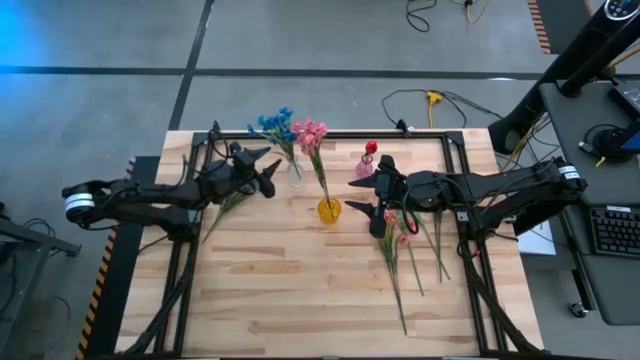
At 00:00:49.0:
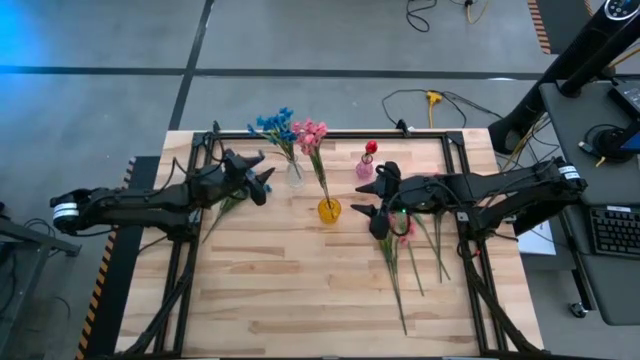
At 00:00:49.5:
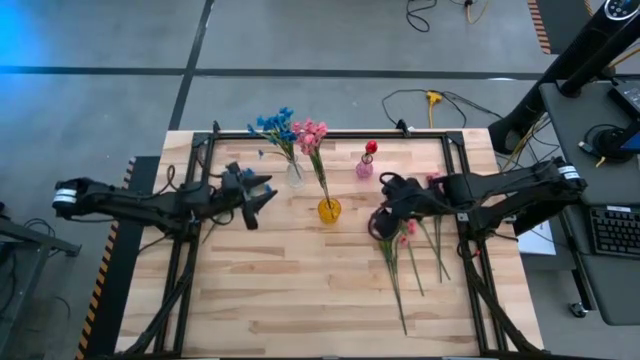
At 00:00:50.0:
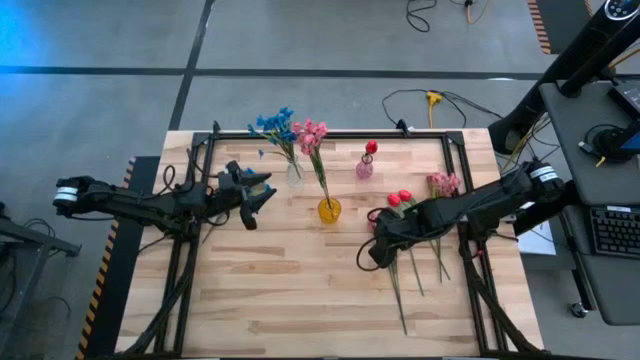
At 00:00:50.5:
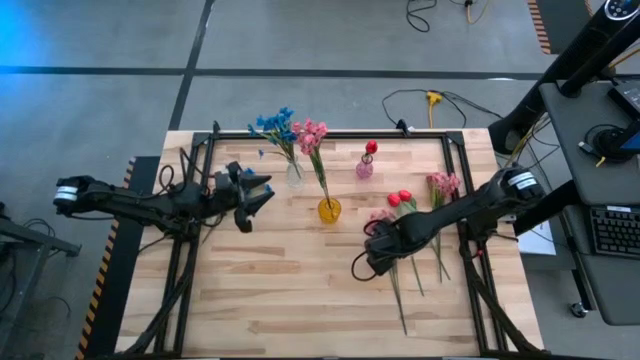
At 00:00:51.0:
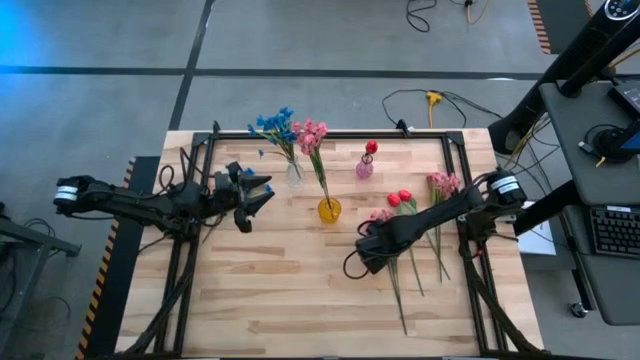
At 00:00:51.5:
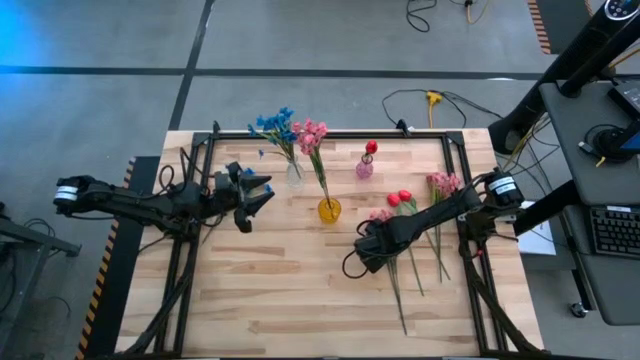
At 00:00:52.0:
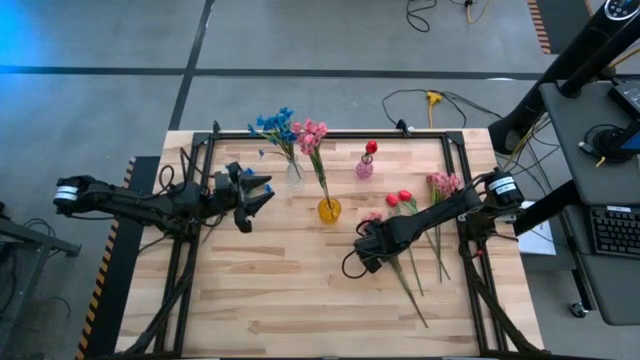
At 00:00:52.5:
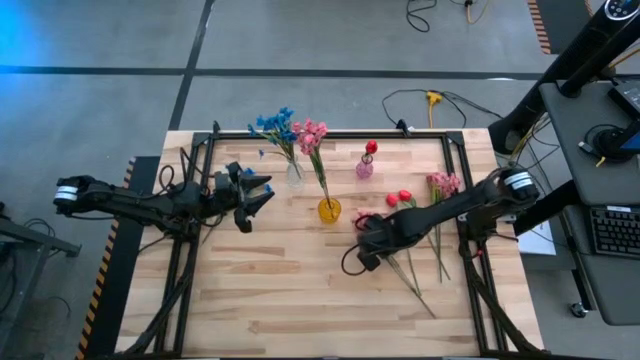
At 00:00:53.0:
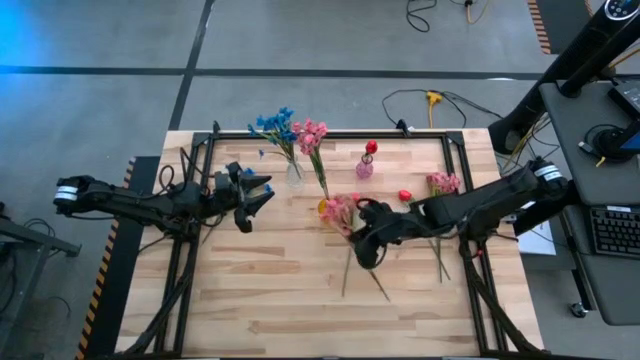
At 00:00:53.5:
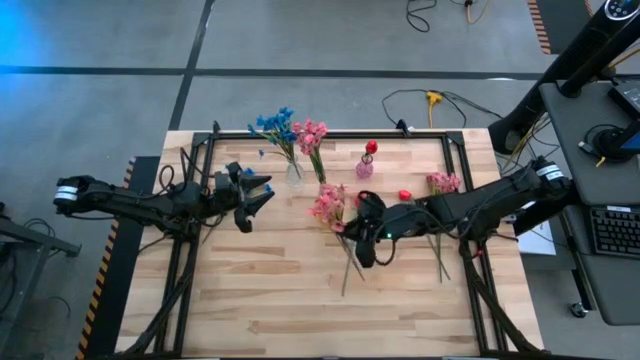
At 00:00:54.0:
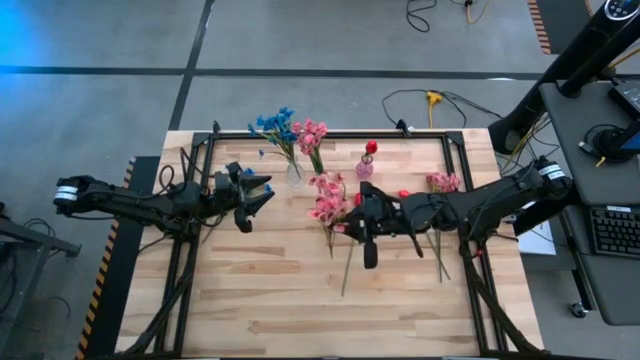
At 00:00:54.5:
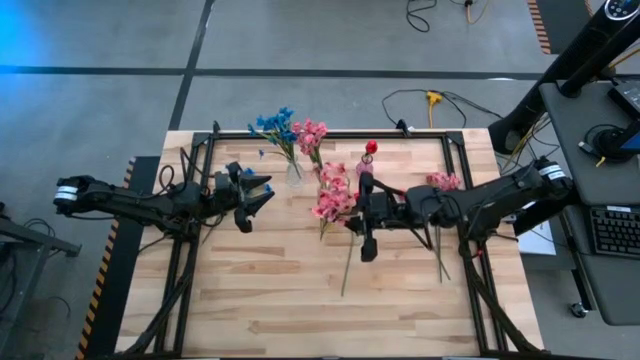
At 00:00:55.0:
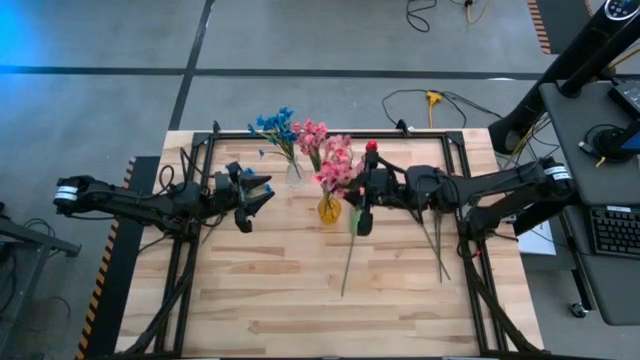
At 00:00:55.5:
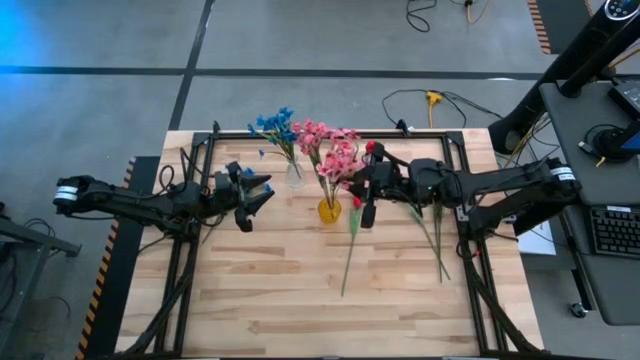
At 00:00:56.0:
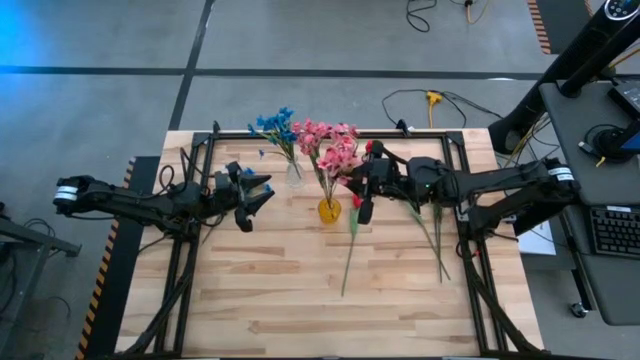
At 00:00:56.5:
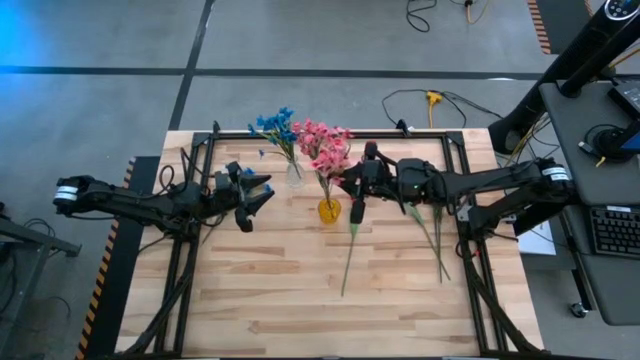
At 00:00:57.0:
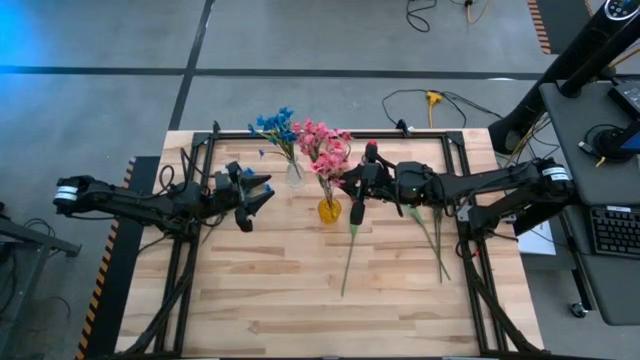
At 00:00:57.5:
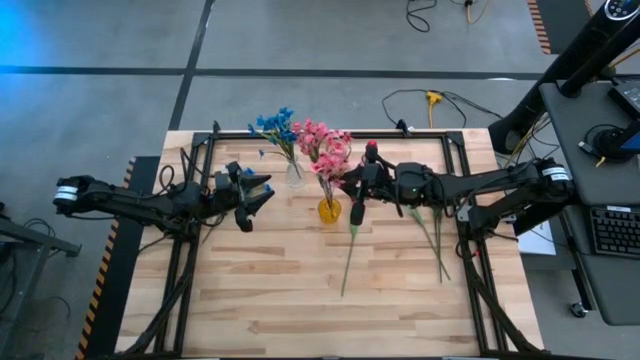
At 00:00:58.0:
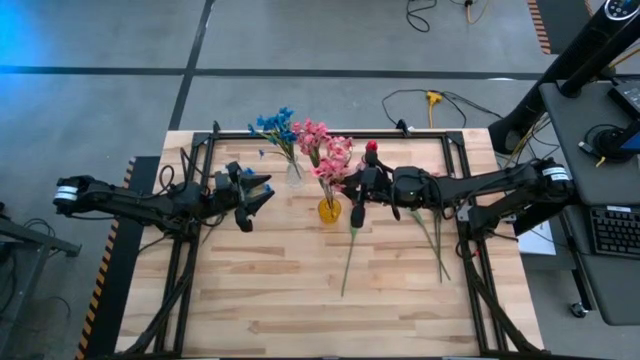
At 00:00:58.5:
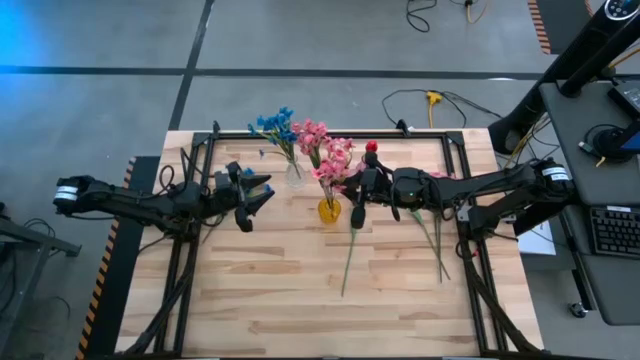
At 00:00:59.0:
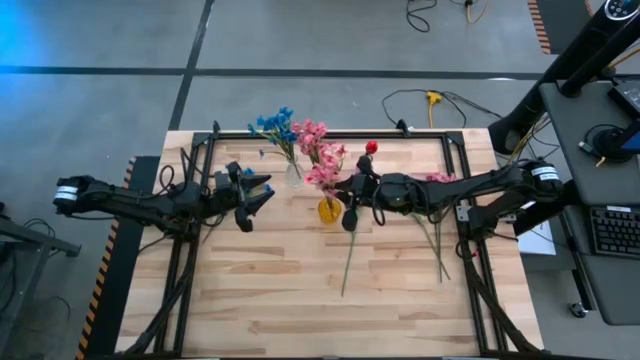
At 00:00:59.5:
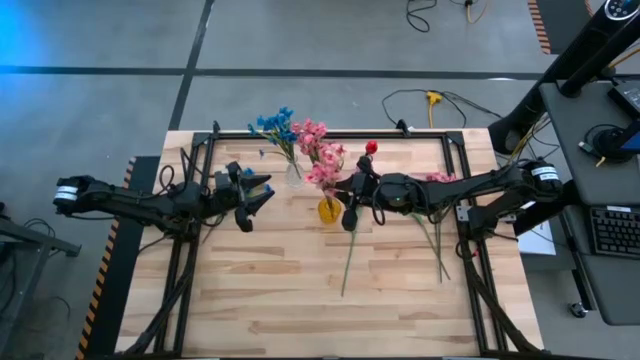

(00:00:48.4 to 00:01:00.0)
Task: Sort flowers into vase by color
Put the left pink flowers into the yellow vase

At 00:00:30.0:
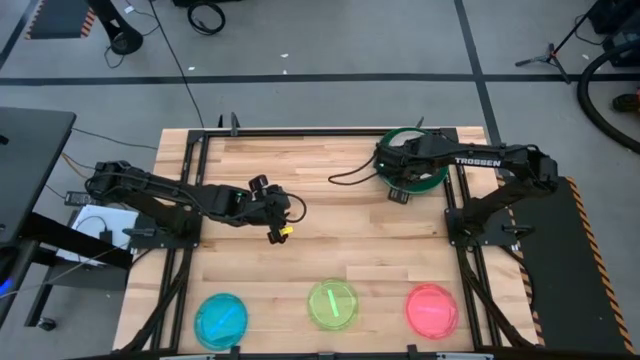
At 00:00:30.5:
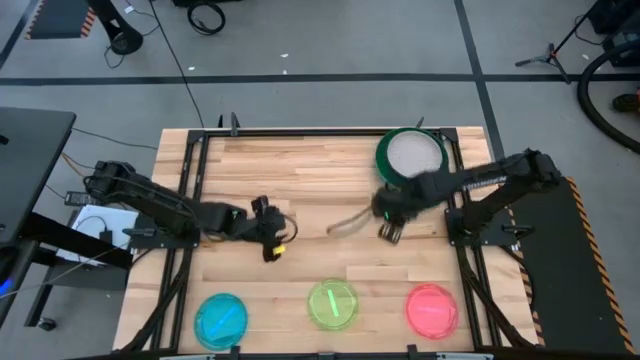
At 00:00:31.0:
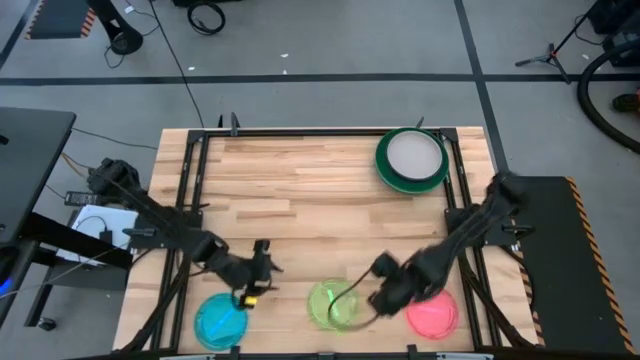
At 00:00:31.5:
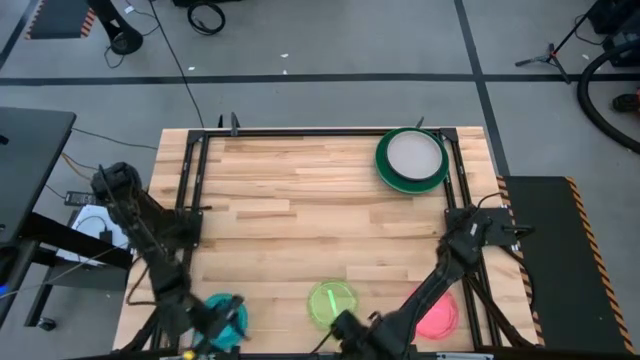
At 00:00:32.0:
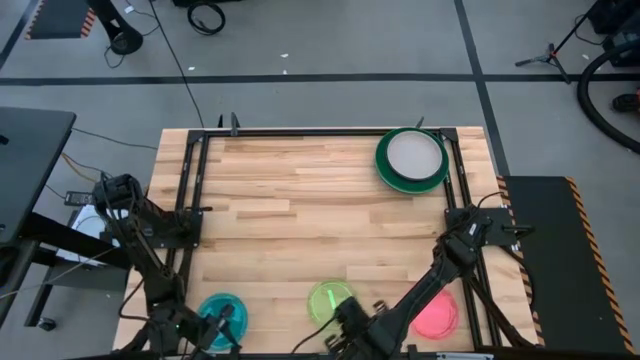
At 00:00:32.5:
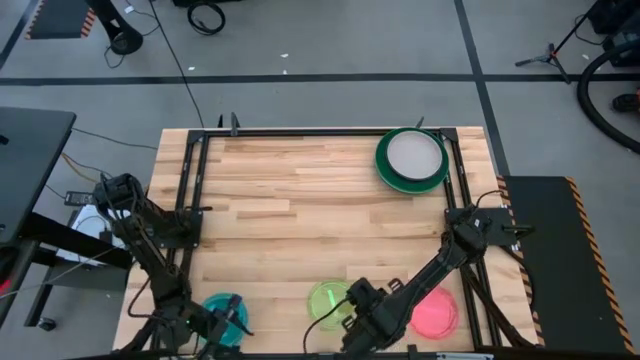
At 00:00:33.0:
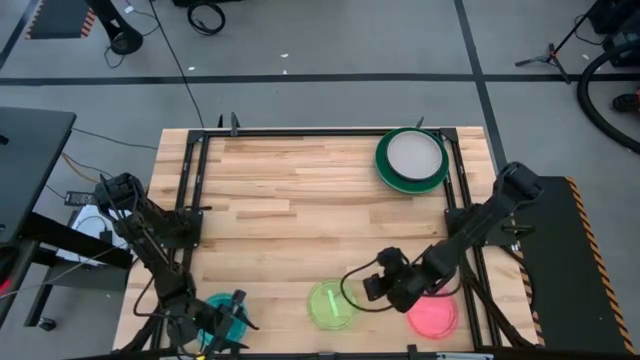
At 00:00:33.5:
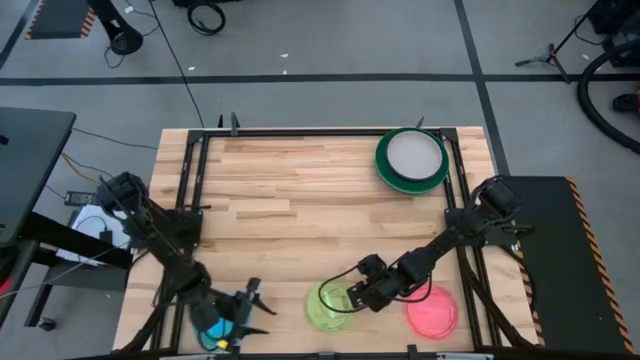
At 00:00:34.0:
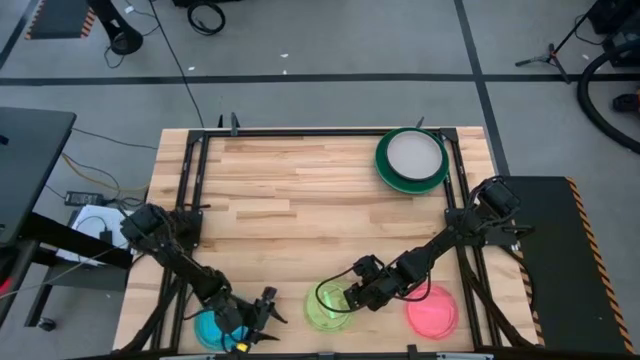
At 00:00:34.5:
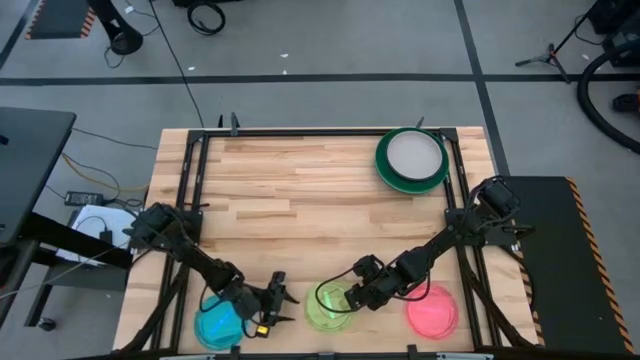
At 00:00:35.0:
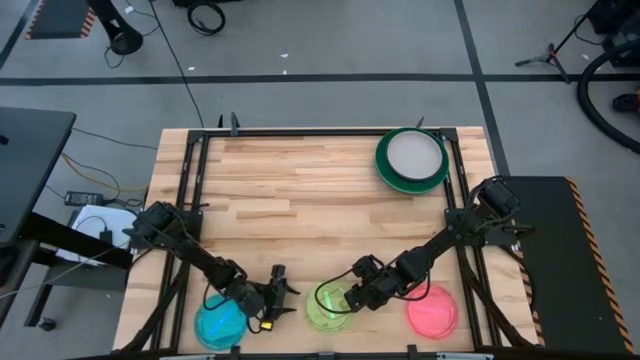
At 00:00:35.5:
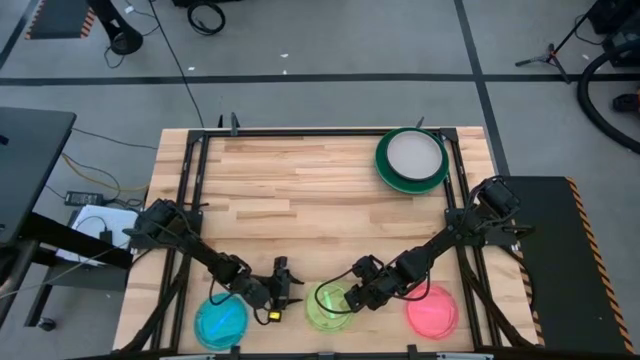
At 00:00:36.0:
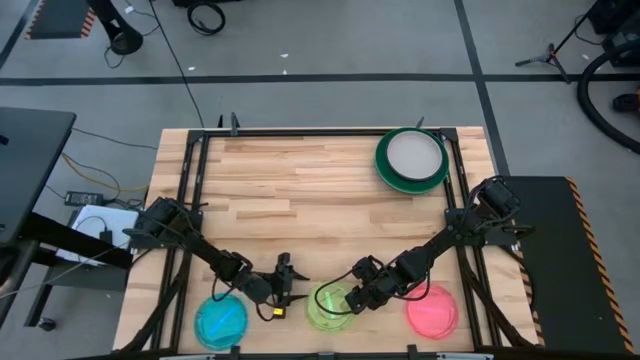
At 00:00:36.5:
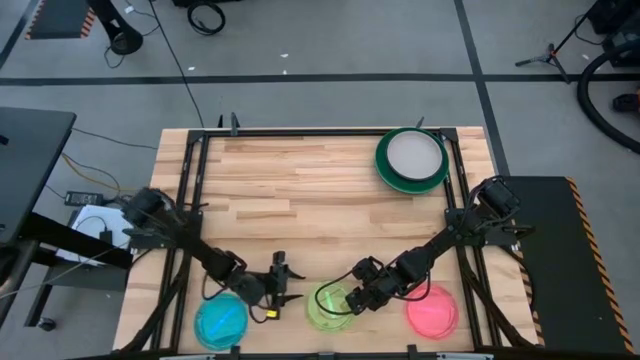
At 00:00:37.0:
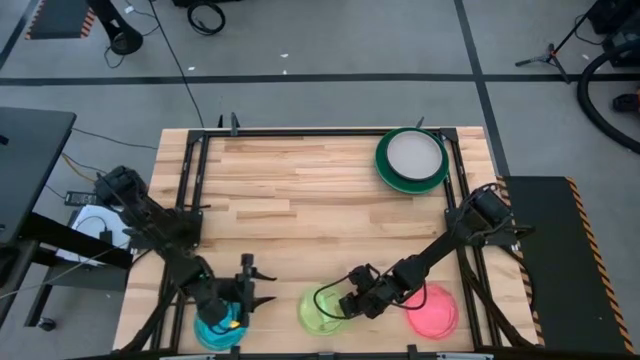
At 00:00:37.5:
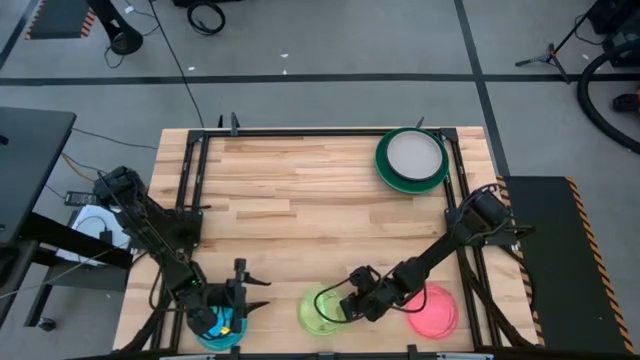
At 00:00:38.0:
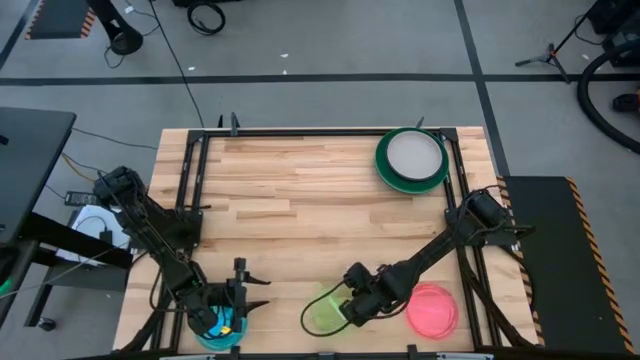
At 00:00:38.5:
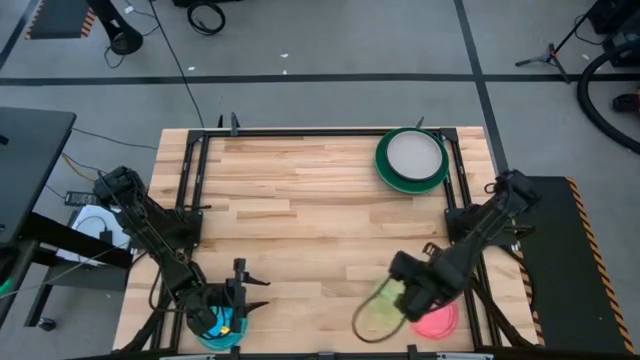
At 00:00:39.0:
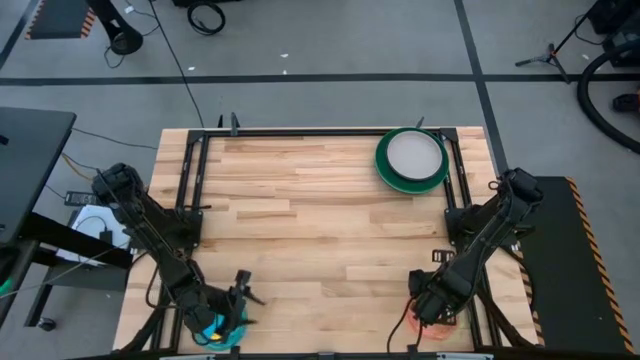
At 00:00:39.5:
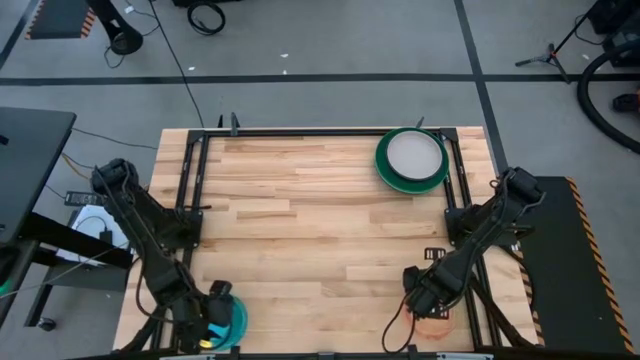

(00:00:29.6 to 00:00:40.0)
Task: Stack plastic plates
Stack the light green plate on top of the pink plate
